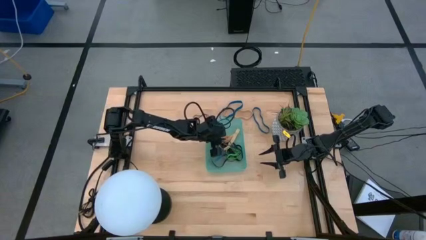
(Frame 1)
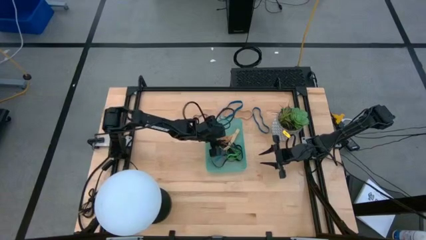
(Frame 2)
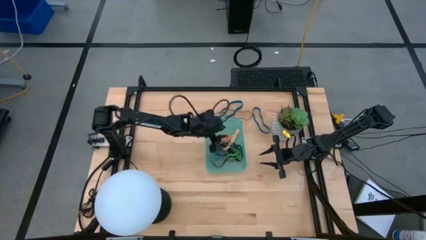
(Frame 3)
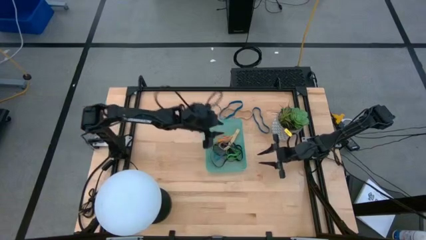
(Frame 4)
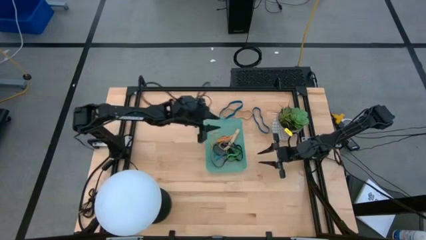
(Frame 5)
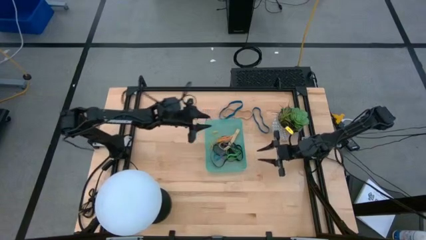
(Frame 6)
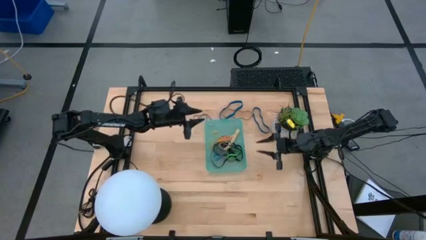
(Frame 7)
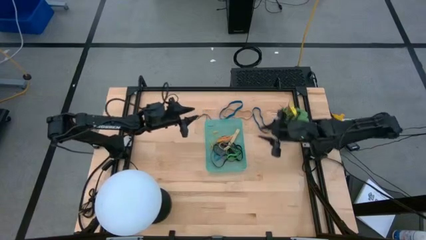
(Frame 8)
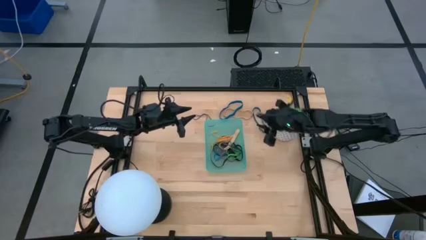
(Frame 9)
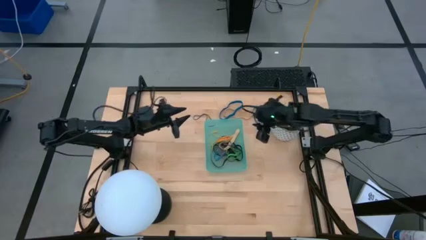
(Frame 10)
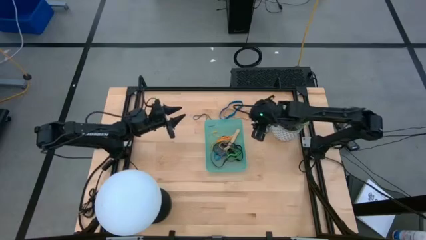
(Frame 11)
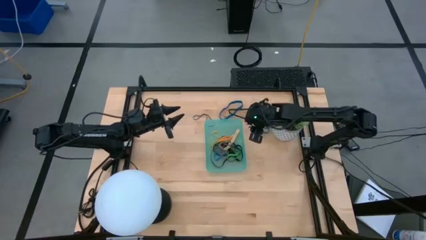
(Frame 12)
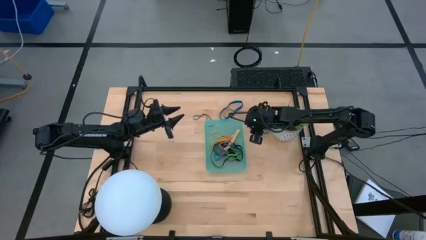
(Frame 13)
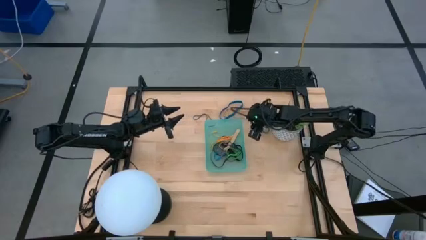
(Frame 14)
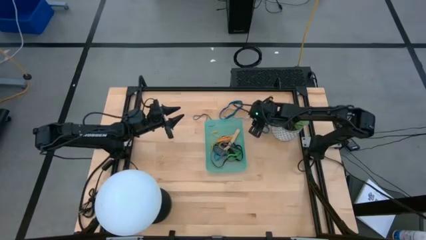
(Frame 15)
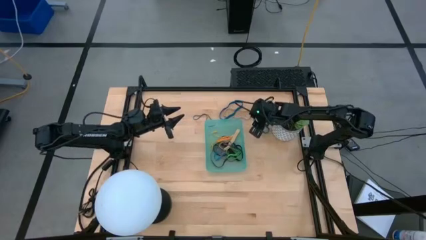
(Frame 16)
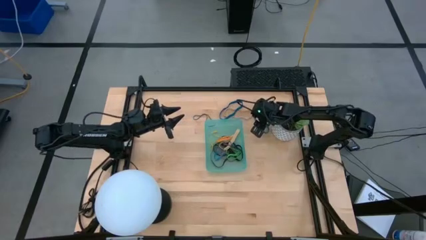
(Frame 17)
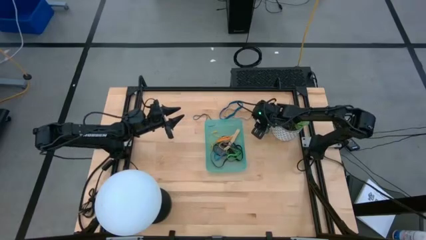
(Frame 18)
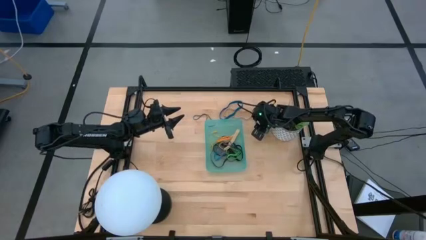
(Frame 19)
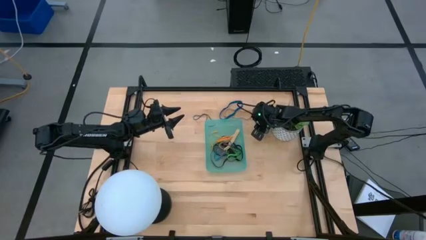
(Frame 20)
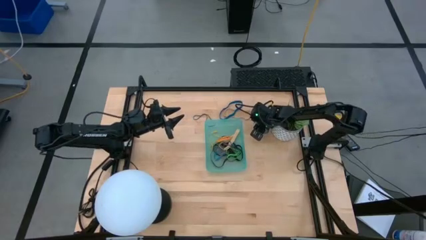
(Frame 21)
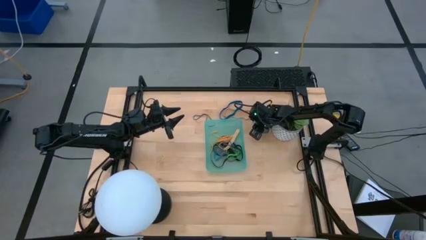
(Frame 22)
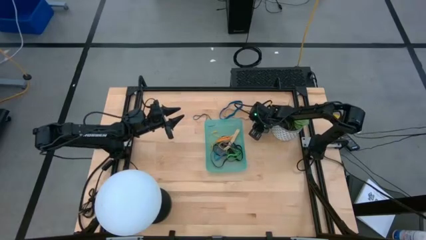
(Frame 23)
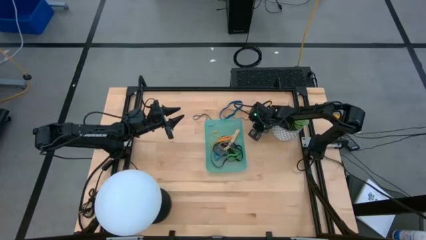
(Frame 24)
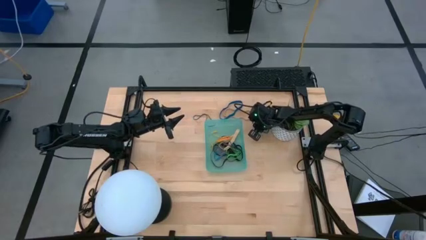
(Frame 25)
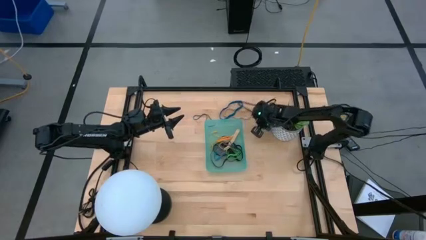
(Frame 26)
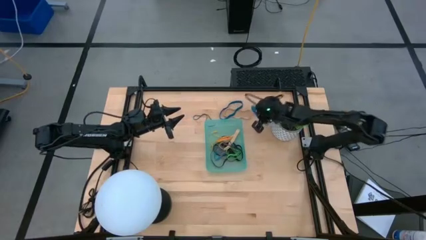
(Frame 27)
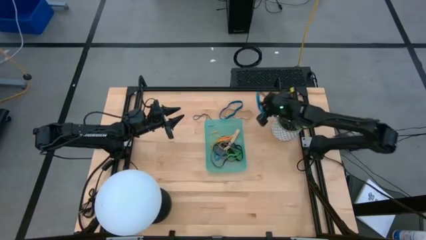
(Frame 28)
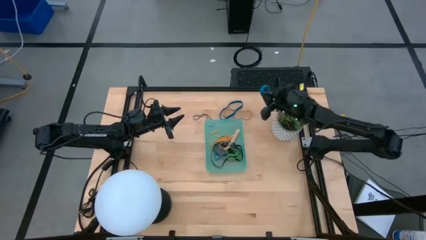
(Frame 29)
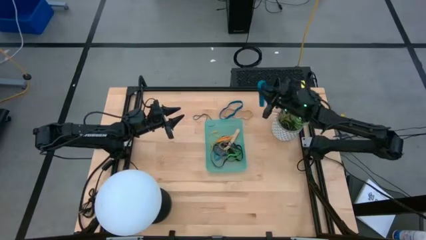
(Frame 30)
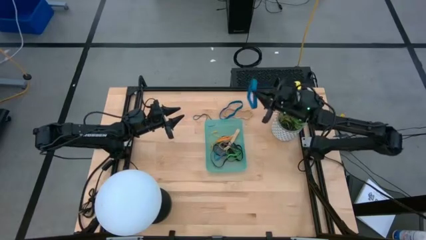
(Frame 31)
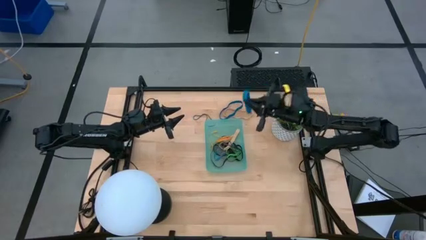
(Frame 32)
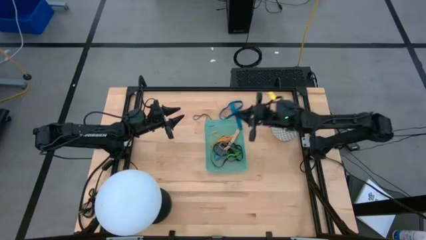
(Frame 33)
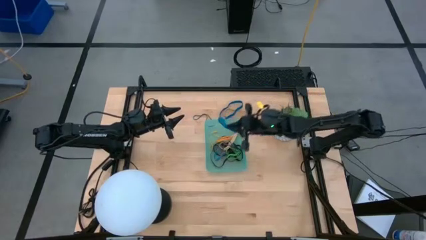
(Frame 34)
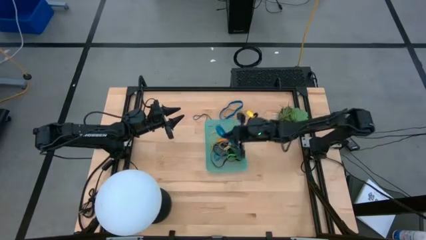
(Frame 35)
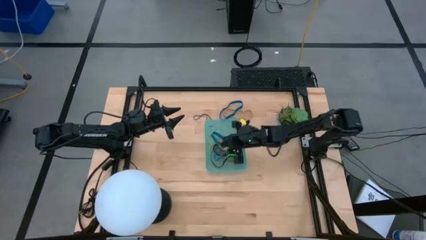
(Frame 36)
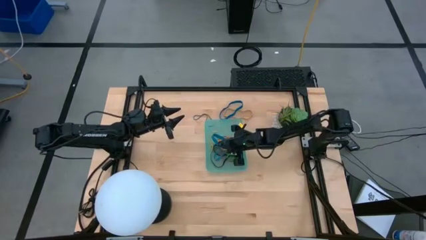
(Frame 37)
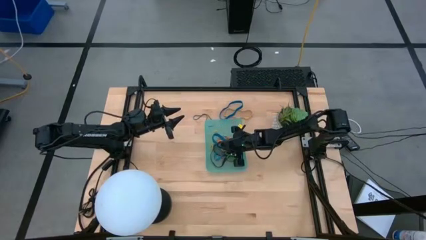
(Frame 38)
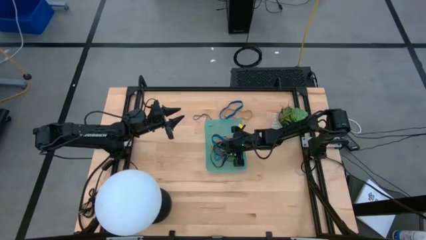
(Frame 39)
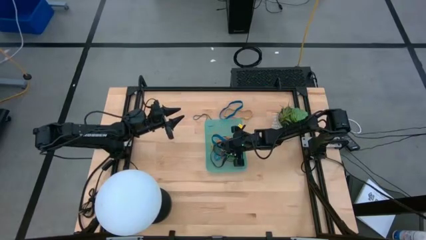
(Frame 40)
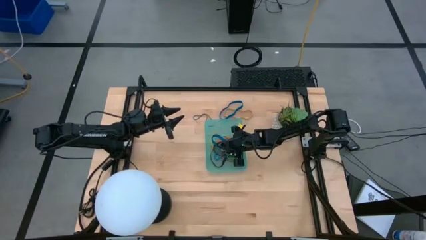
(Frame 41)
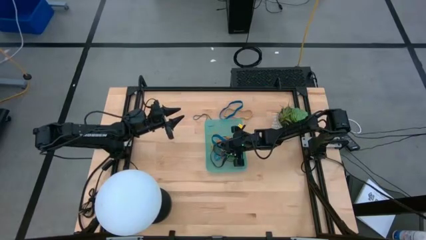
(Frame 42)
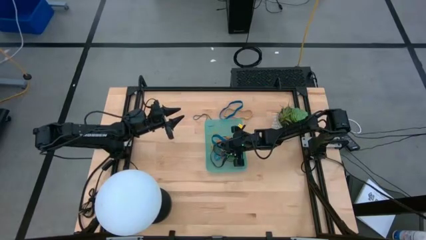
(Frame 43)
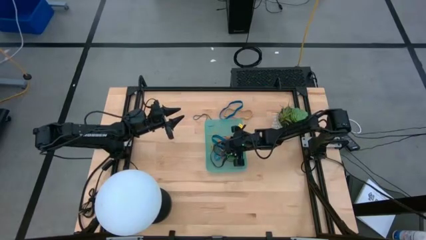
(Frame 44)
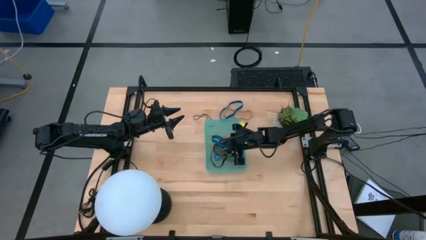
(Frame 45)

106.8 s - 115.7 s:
Task: Pick and place rubber bands into bin
Put the blue rubber band into the green bin

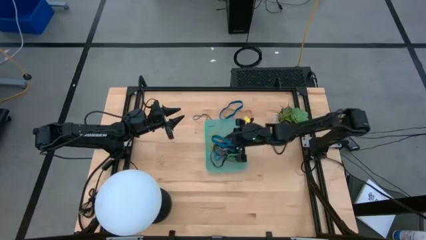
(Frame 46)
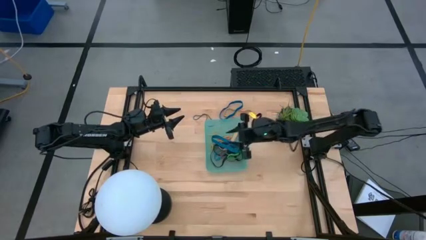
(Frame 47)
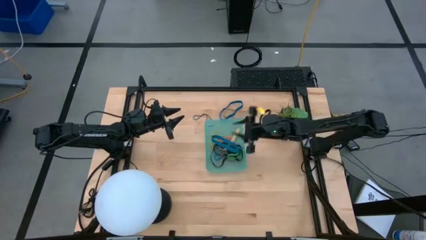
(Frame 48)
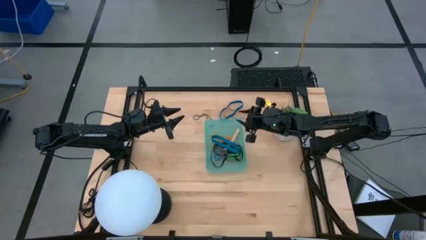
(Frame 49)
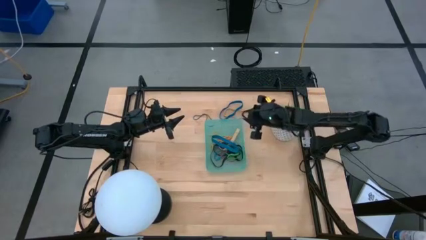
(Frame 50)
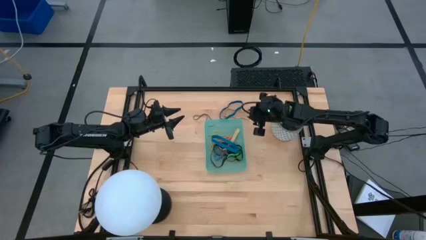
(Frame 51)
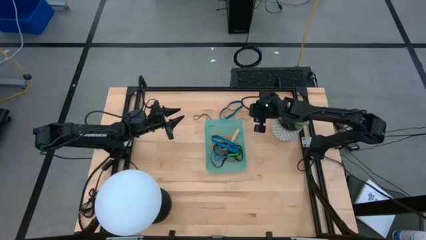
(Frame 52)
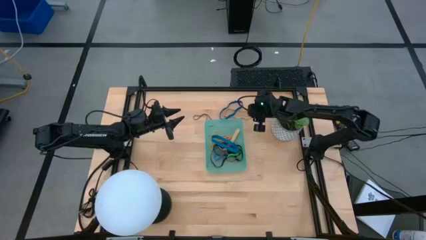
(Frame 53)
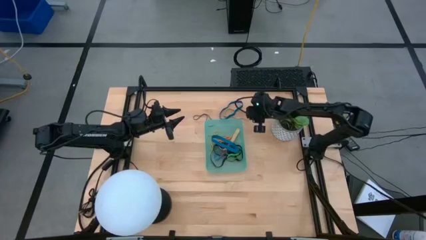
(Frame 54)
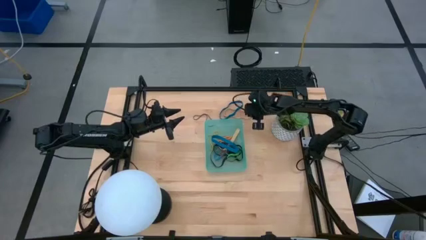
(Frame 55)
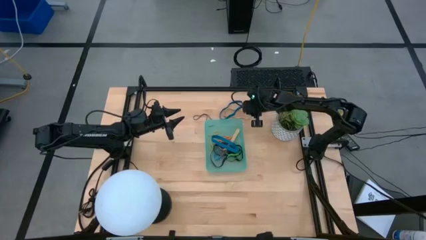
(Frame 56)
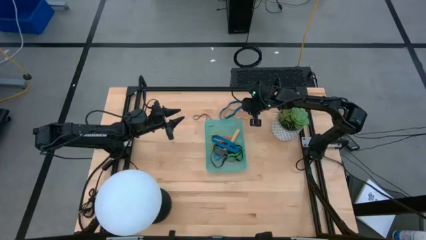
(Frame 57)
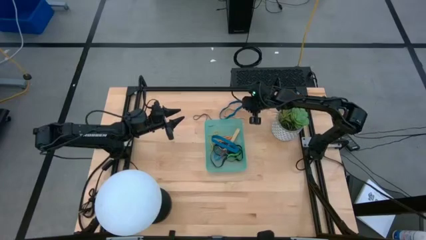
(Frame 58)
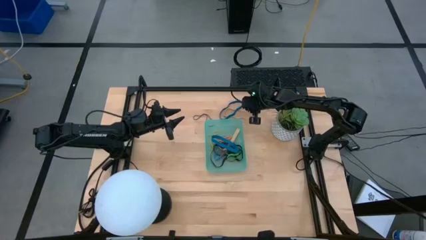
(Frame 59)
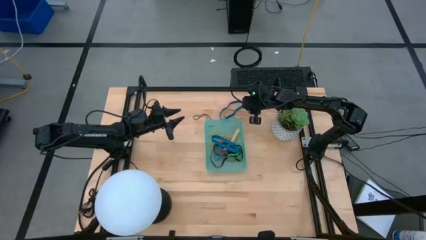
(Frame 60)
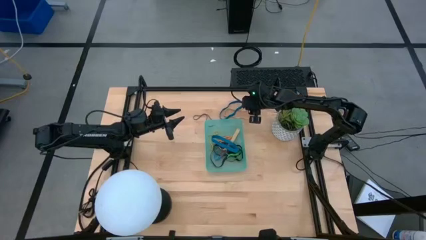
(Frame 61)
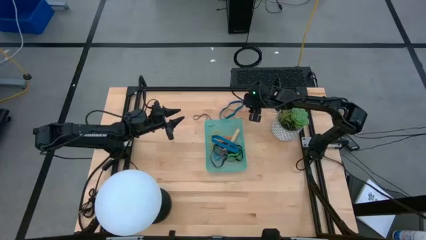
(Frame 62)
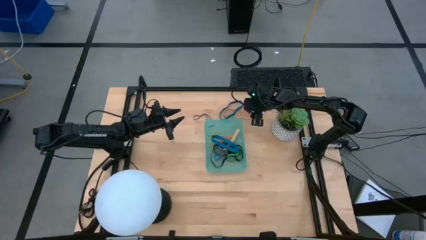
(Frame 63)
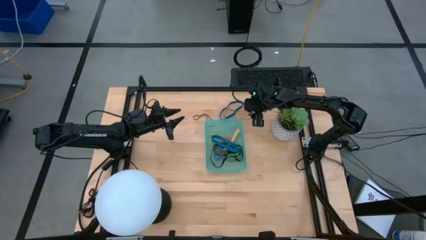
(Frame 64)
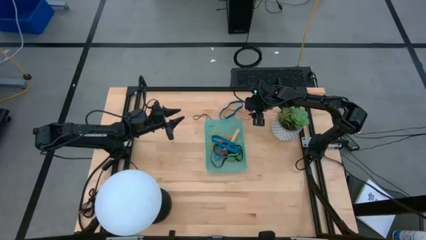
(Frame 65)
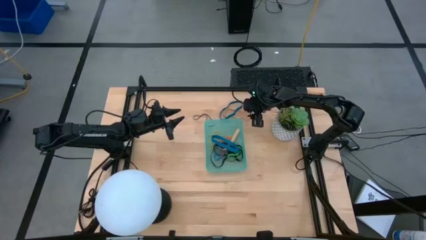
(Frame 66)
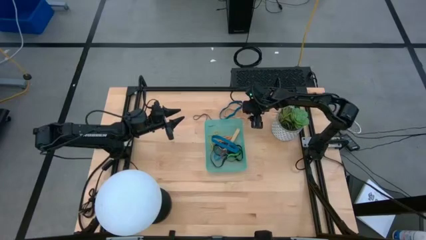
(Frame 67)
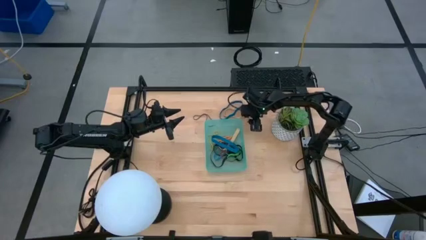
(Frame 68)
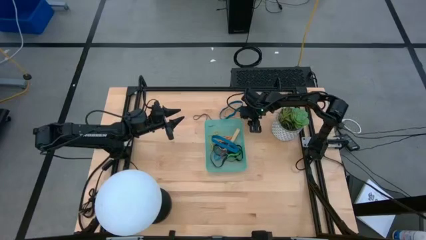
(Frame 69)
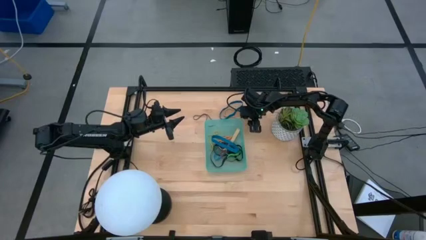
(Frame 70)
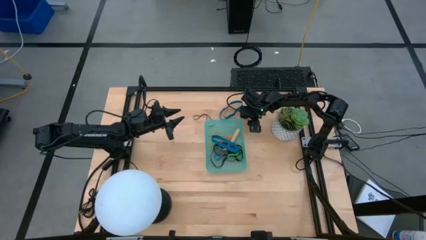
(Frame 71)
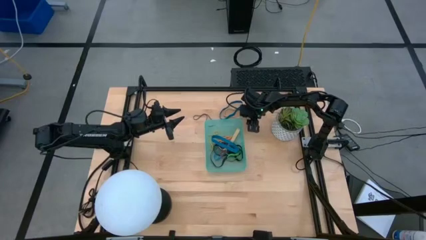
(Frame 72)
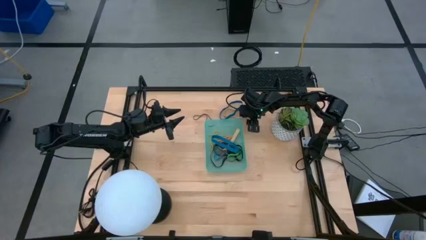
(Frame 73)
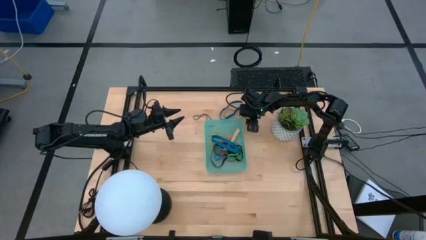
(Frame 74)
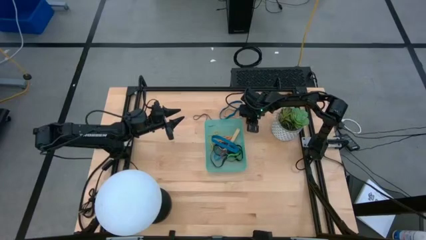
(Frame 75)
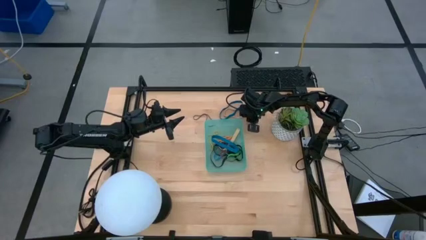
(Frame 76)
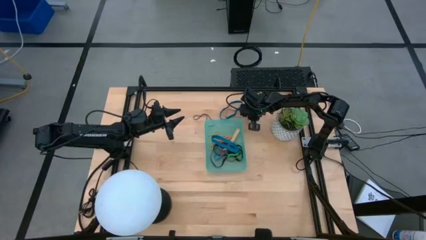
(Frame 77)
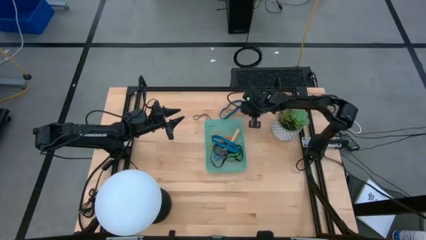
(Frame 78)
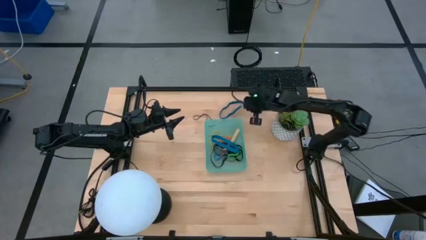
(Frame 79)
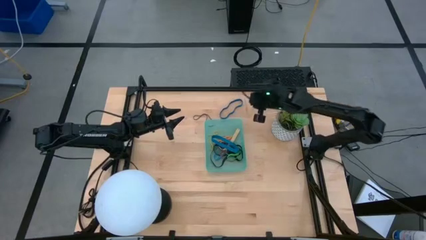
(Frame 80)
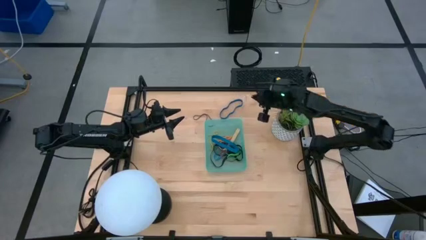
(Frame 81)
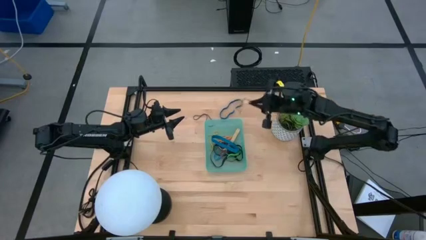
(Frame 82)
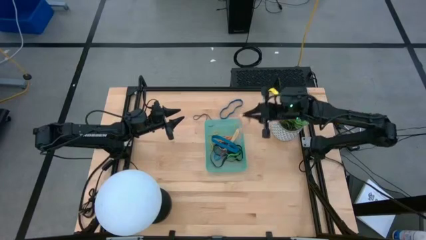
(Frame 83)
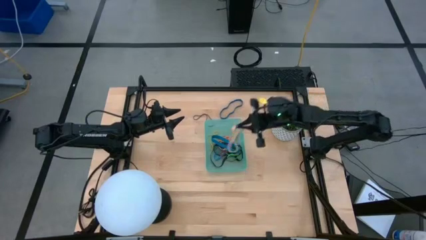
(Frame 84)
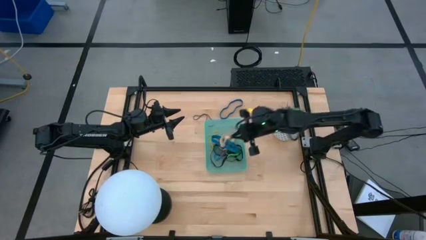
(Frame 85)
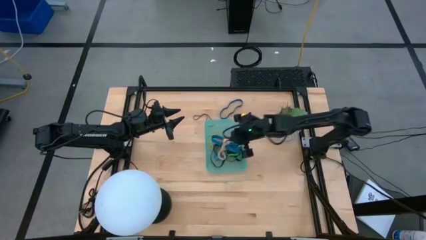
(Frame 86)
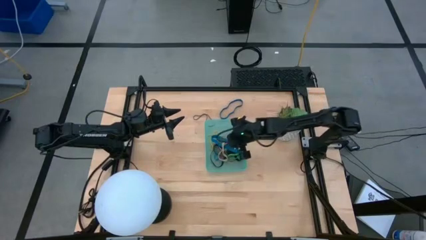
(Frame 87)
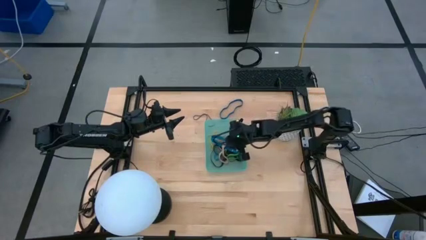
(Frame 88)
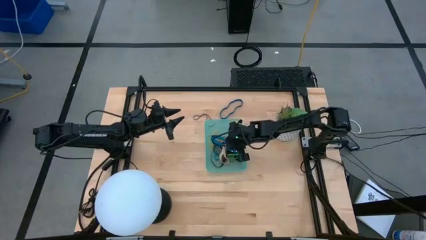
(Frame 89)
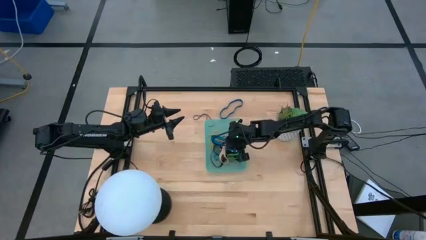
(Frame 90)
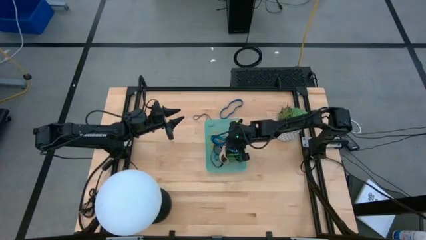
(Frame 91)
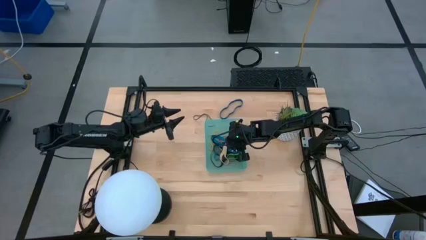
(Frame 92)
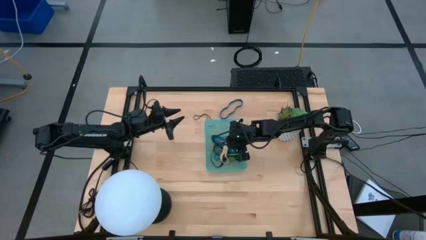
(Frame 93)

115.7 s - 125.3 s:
Put the brown rubber band into the green bin
